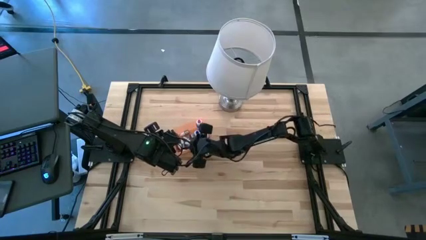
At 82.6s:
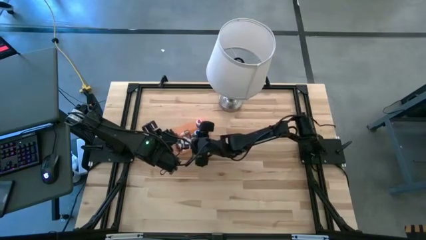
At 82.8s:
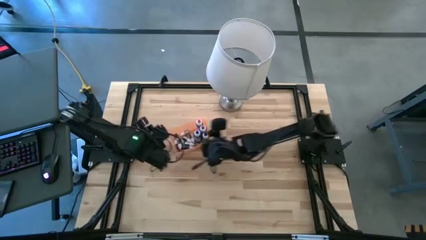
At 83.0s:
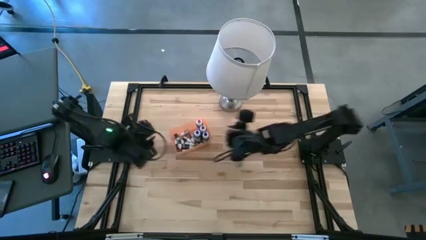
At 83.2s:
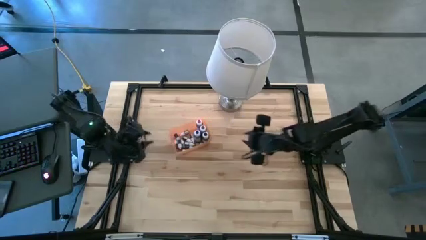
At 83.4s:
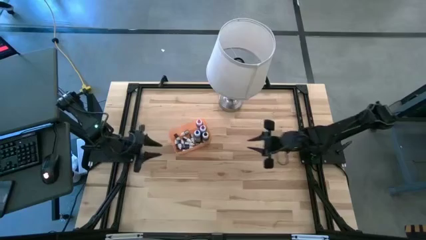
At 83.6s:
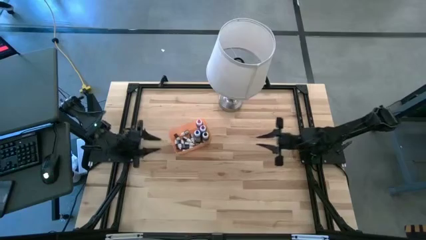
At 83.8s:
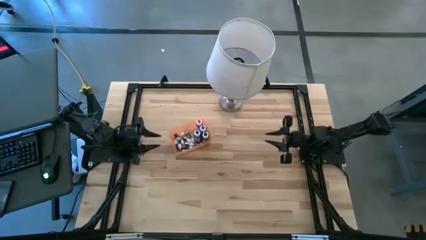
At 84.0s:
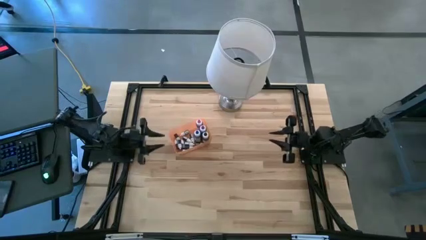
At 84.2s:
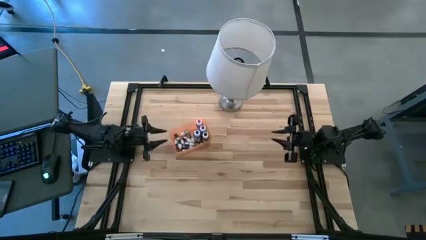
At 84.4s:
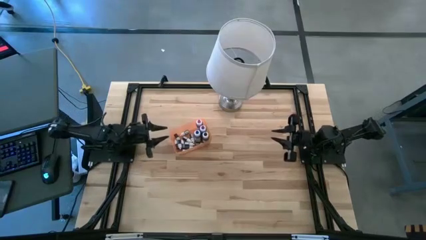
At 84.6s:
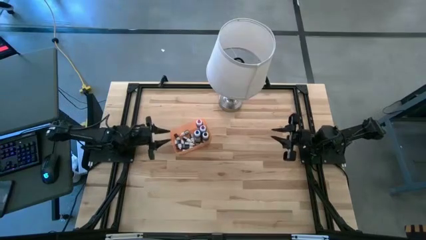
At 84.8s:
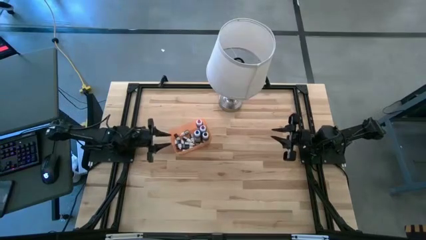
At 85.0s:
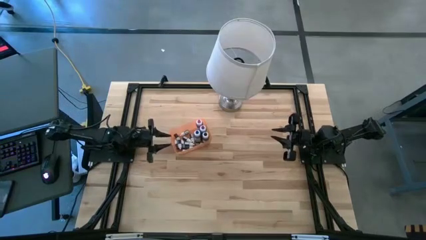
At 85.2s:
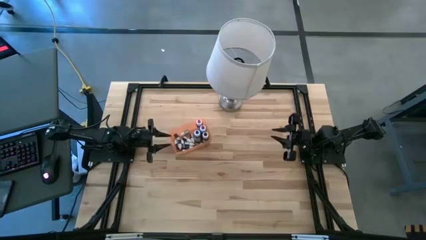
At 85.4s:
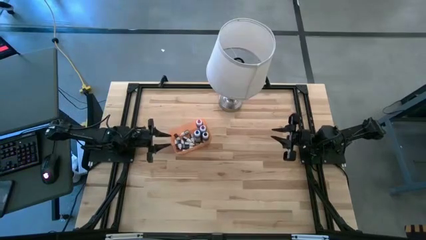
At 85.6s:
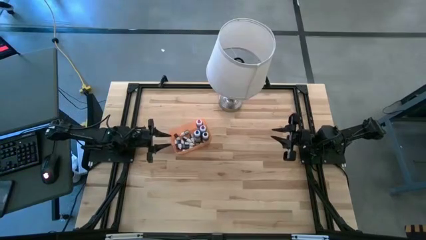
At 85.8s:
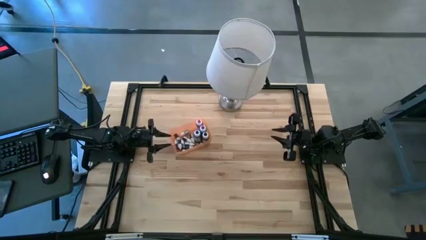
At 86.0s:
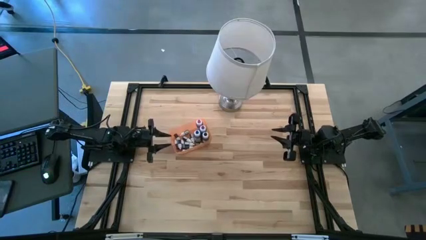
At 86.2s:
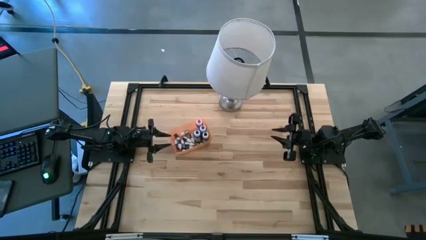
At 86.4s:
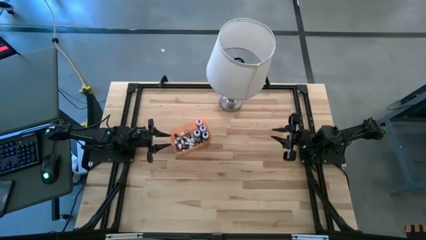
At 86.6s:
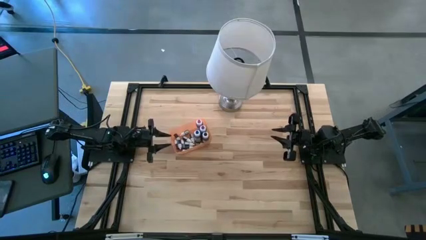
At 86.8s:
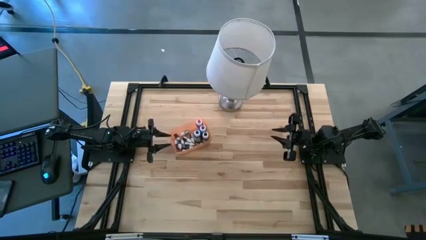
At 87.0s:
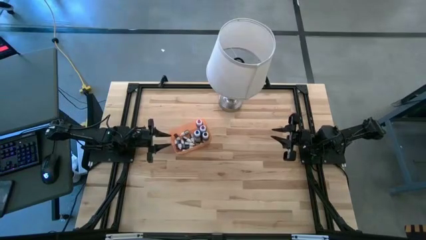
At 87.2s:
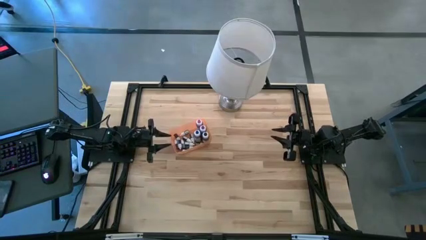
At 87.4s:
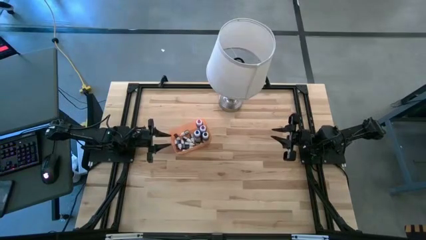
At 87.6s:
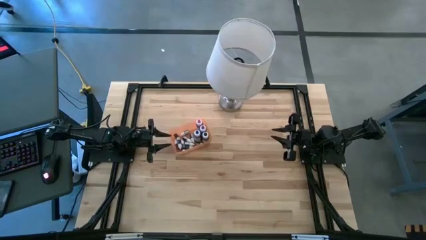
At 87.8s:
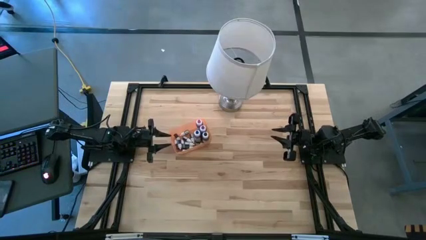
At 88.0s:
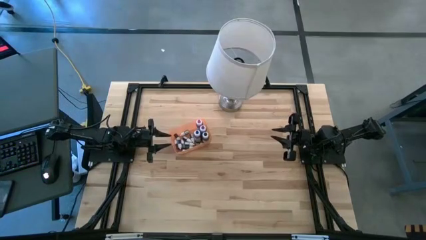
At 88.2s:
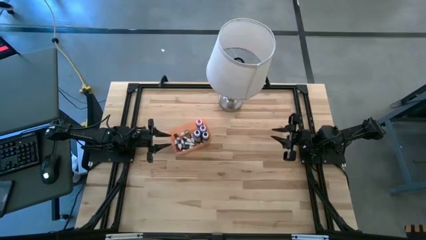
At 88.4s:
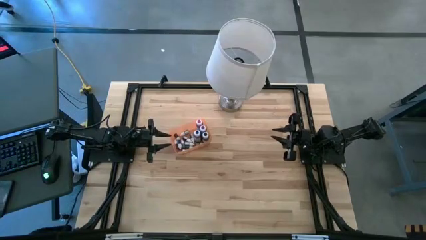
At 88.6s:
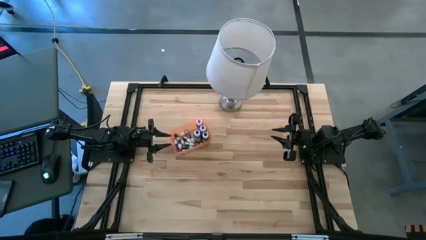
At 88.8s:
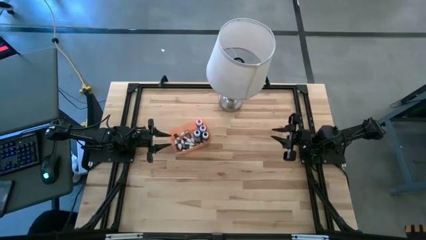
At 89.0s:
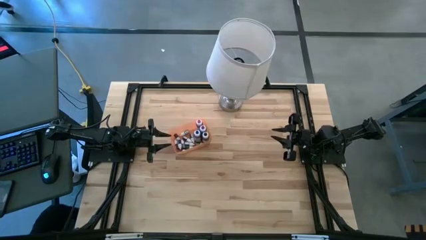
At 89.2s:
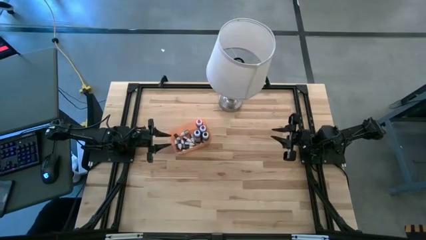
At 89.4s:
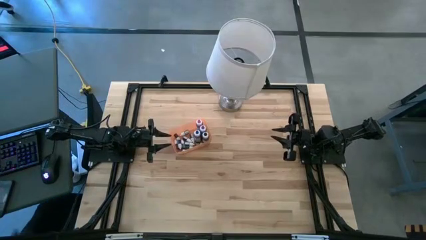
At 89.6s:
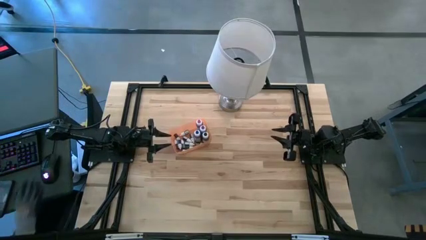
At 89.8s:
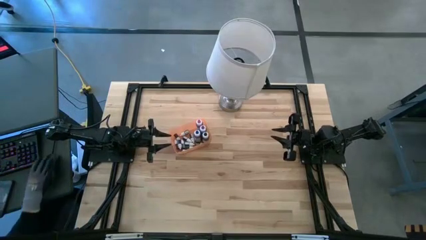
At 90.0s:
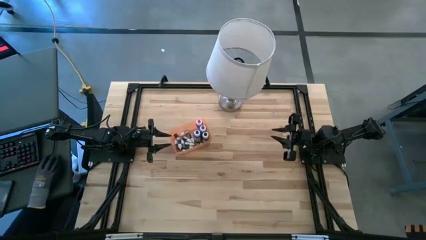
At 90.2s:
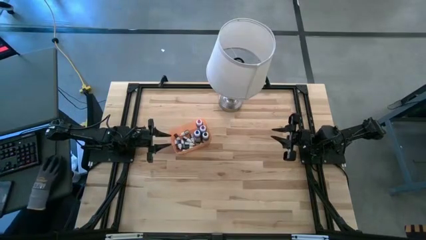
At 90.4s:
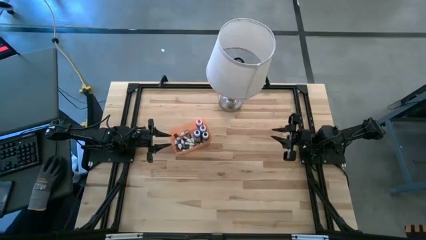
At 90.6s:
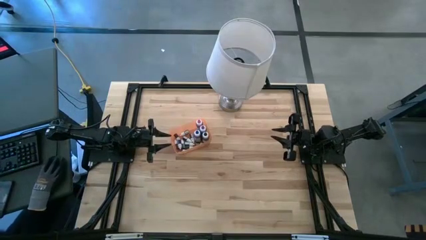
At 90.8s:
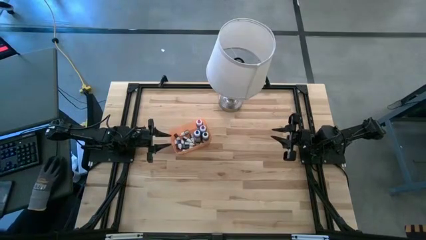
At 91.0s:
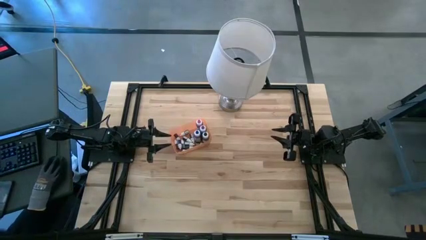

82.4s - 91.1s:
Task: Pick & Place food coloring
Return to Home Position

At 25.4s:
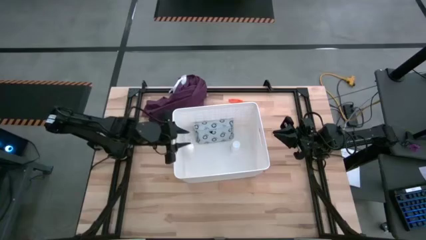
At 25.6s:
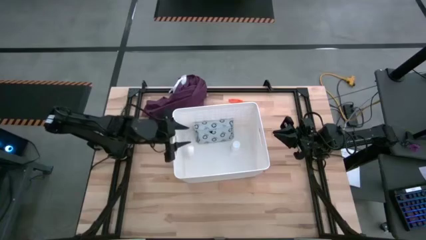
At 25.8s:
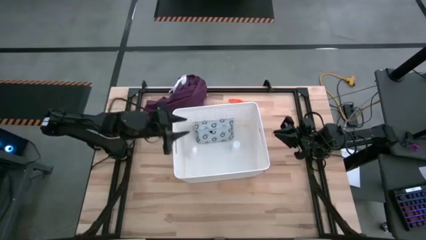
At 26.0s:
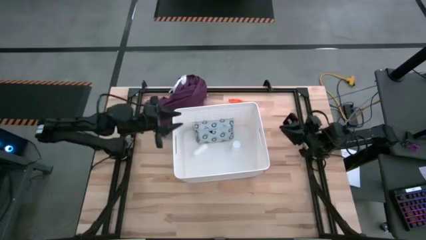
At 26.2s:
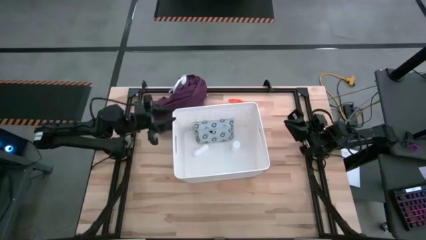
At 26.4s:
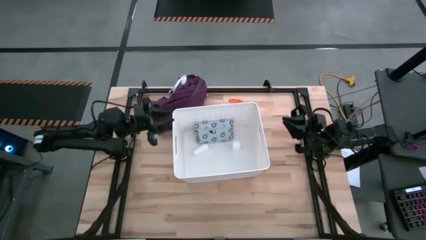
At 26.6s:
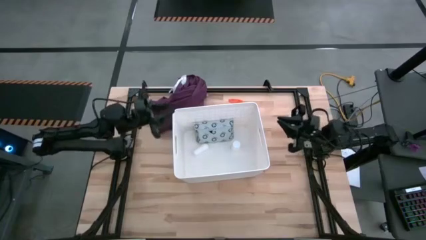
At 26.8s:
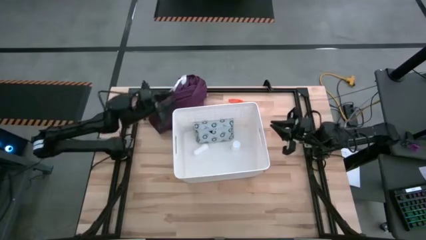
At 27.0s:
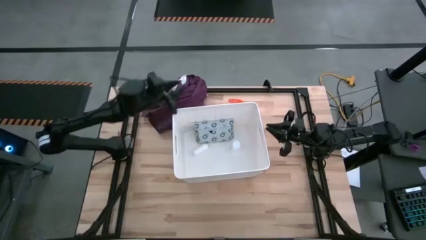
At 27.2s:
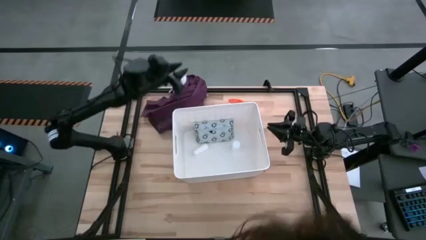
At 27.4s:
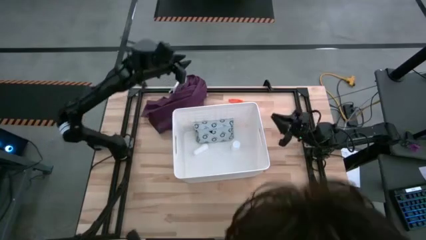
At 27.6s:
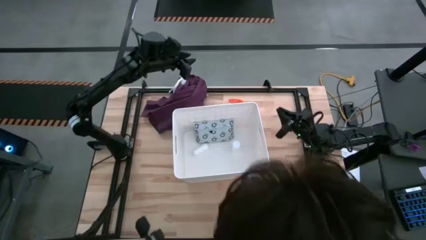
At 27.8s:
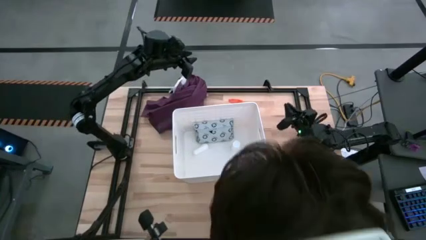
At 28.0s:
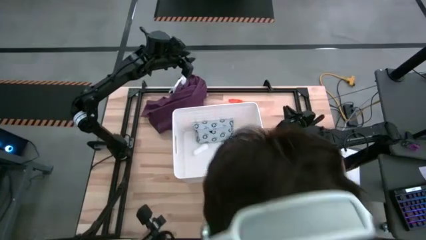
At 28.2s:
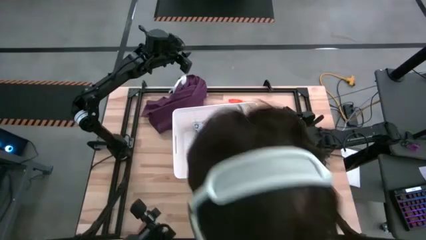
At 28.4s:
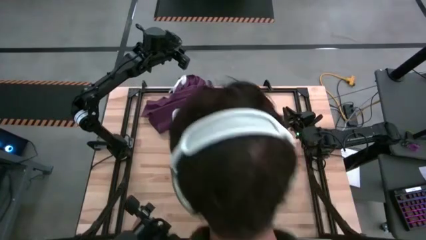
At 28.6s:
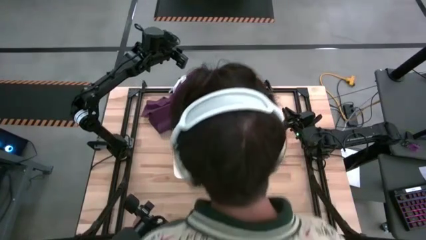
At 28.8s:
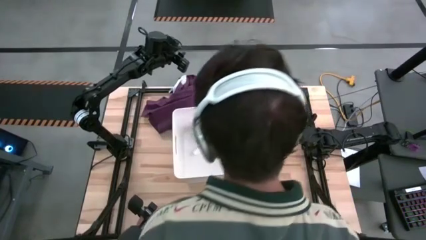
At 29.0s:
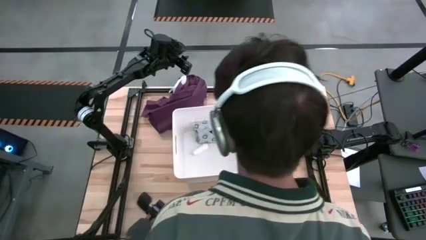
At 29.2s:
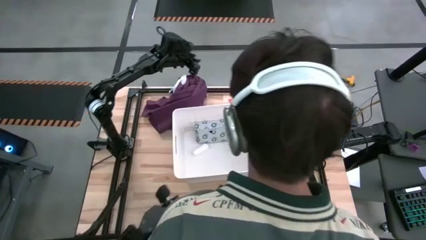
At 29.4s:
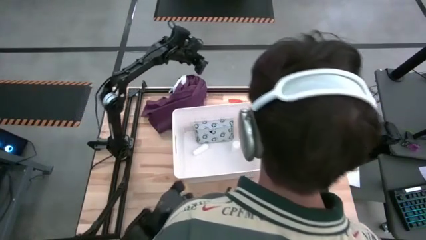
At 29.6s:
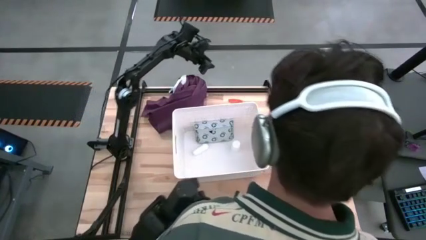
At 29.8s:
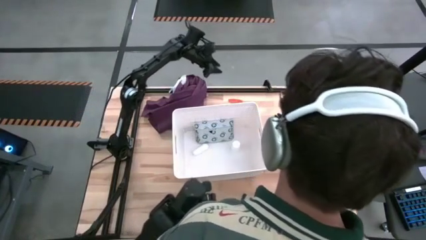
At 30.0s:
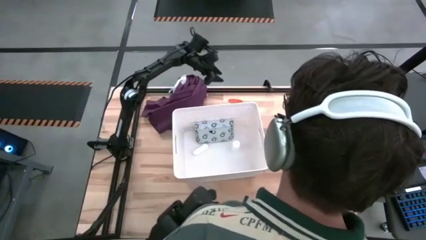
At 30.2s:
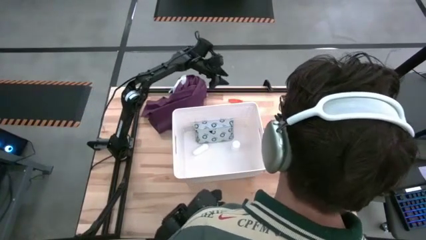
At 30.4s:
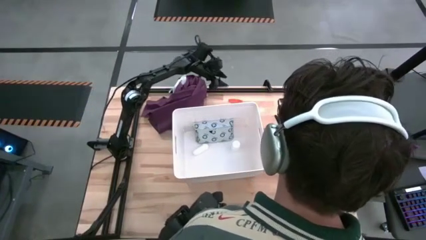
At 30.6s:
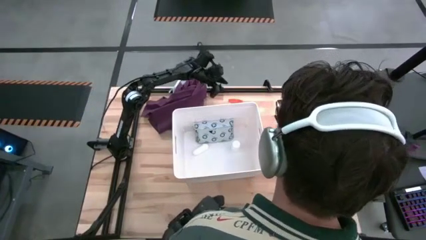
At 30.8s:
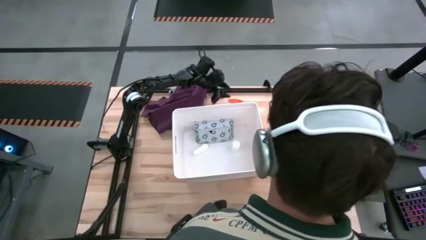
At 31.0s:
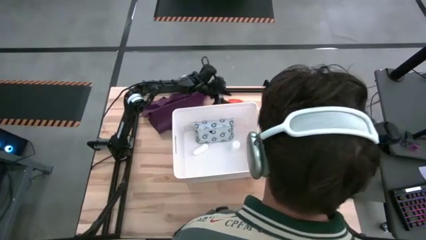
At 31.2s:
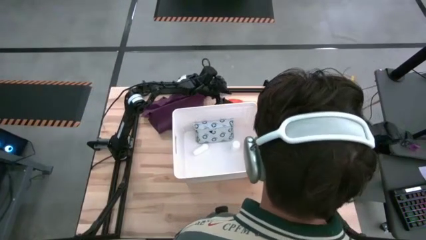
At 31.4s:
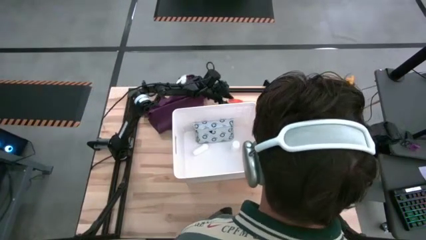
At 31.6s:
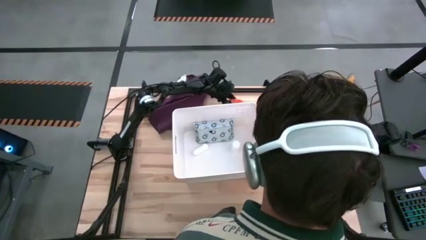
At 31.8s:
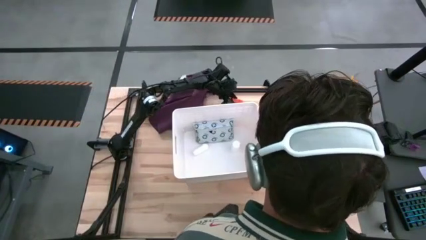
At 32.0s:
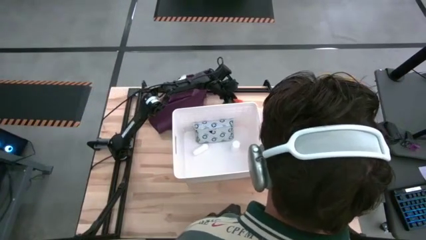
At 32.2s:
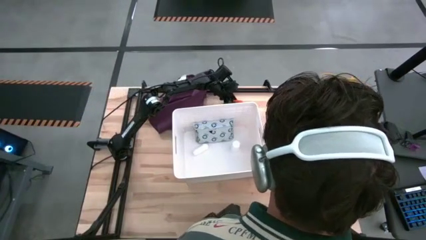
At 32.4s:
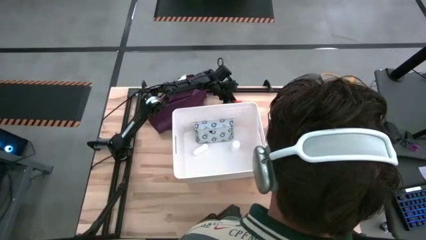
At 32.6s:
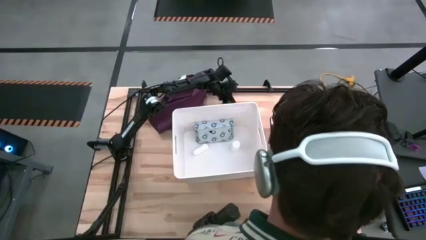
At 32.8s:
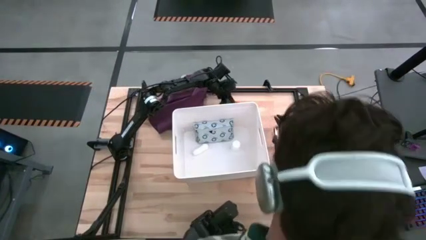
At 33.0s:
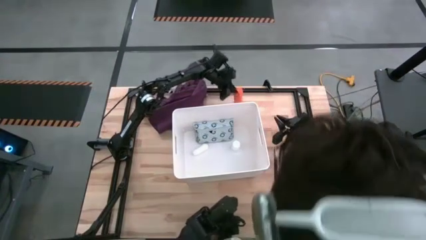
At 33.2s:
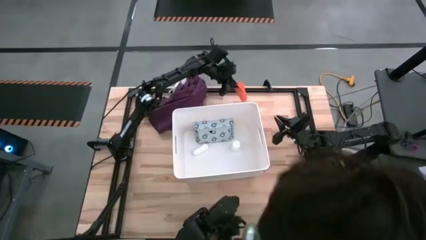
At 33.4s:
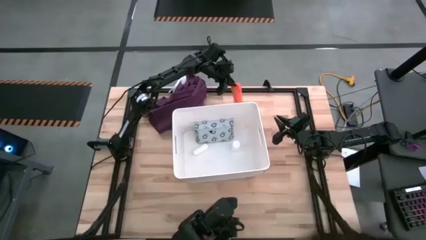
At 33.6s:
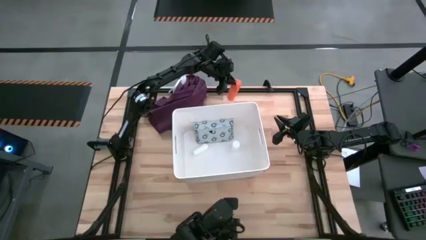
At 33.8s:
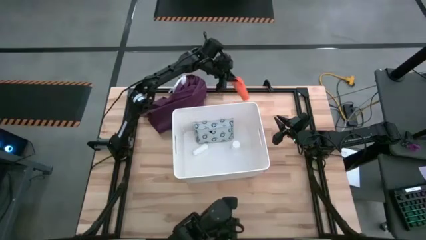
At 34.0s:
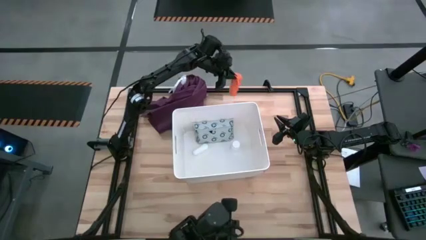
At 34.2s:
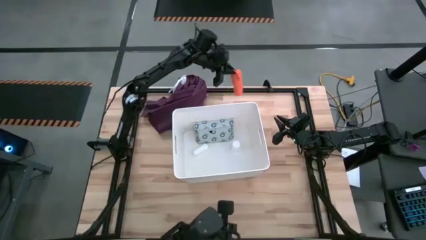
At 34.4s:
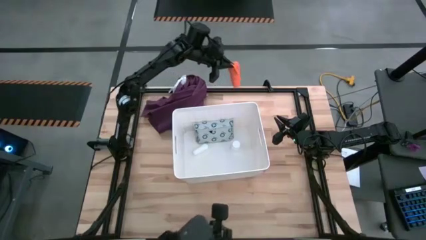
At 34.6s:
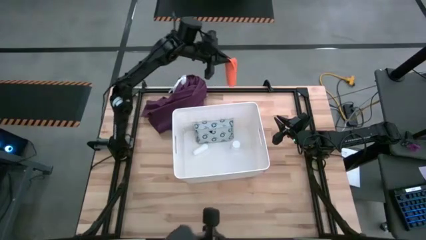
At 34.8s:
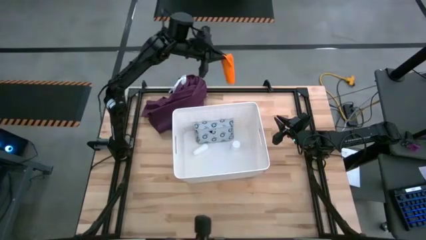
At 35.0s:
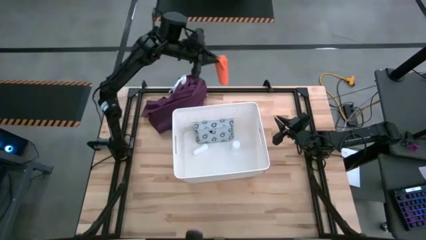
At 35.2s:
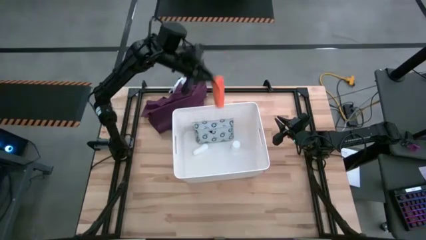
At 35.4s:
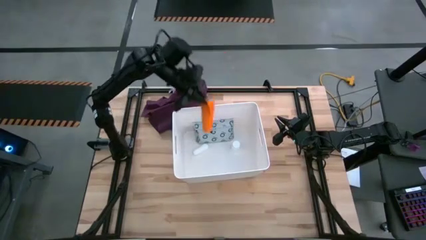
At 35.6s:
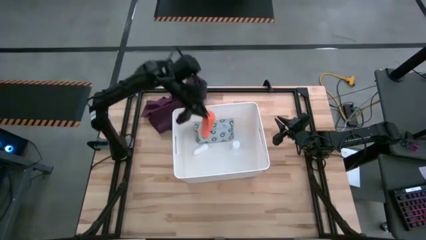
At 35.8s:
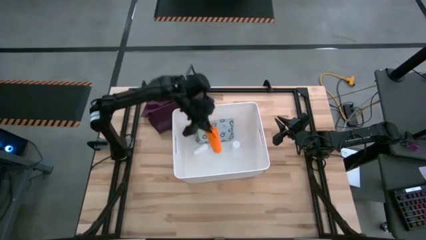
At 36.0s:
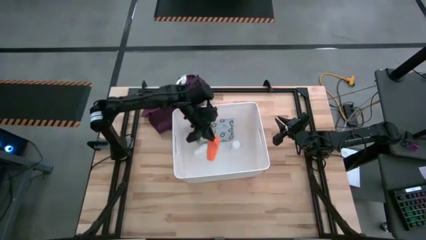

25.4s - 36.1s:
Task: Pick & place medical supplies in basket/bin
Put the orange bandage into the white bin
